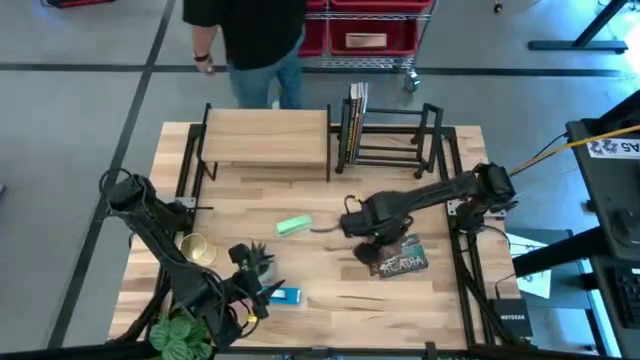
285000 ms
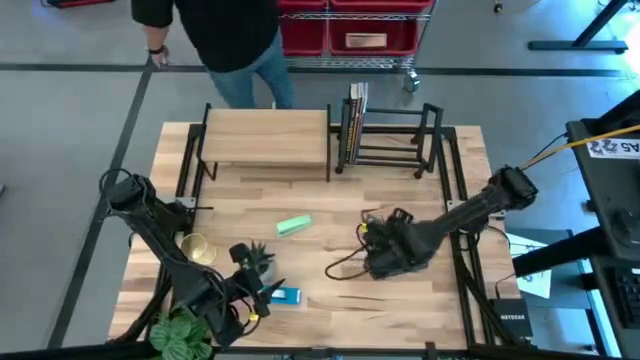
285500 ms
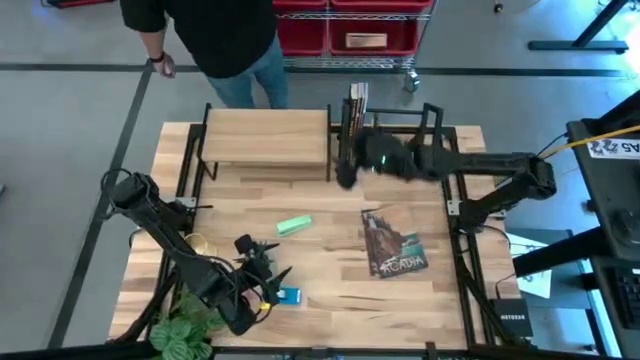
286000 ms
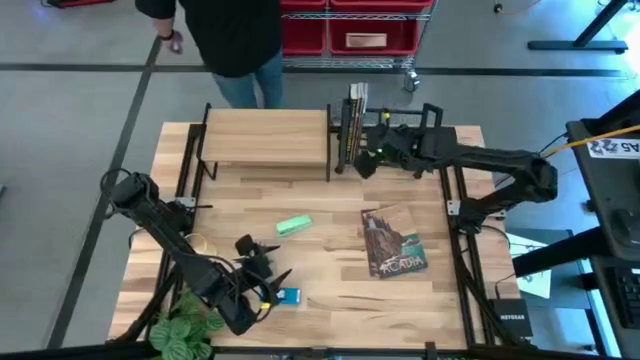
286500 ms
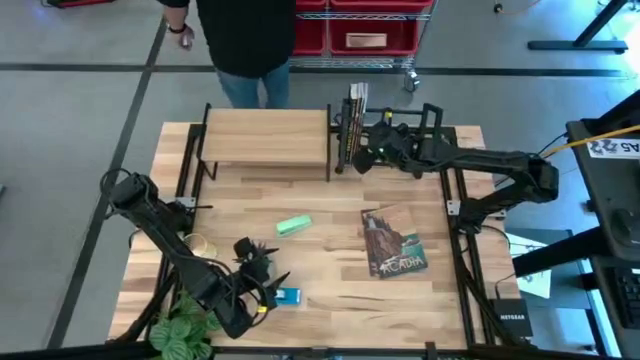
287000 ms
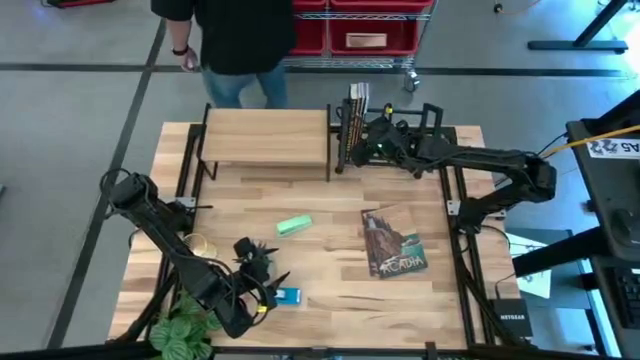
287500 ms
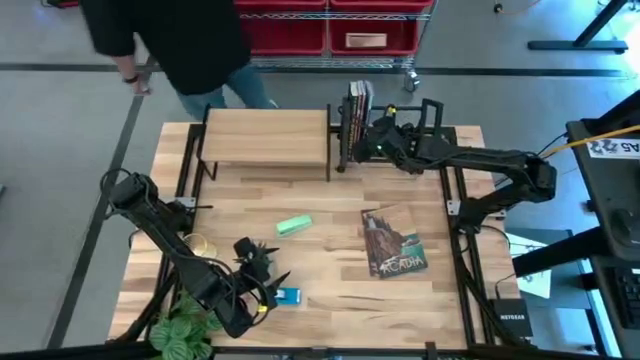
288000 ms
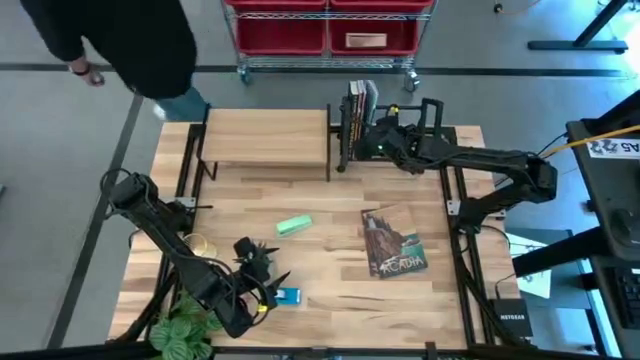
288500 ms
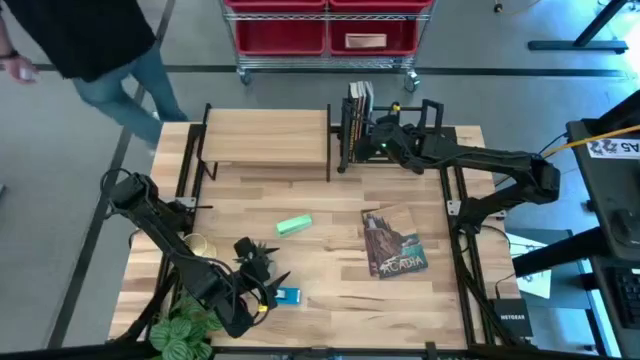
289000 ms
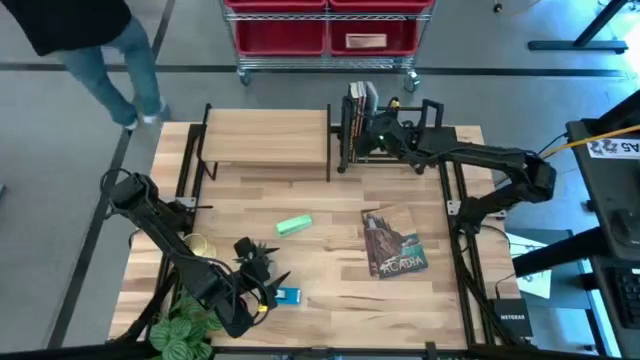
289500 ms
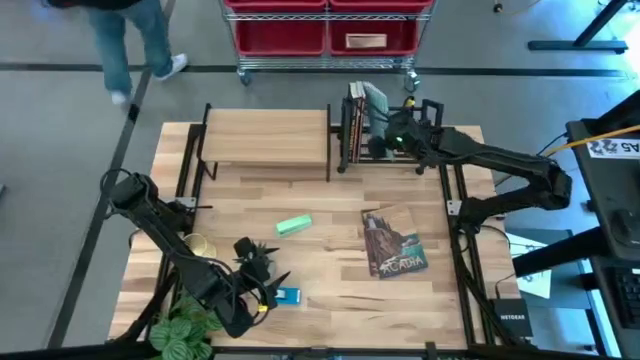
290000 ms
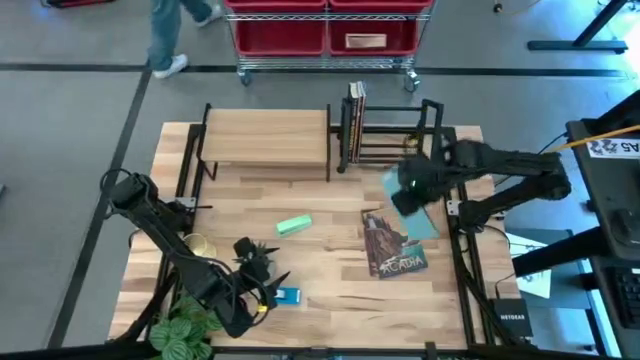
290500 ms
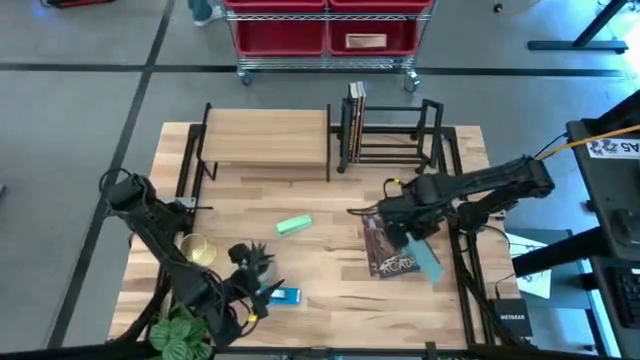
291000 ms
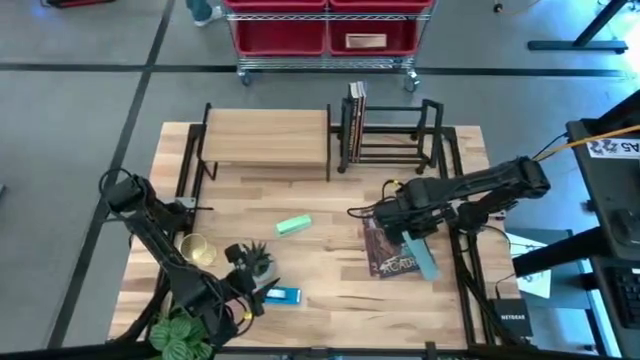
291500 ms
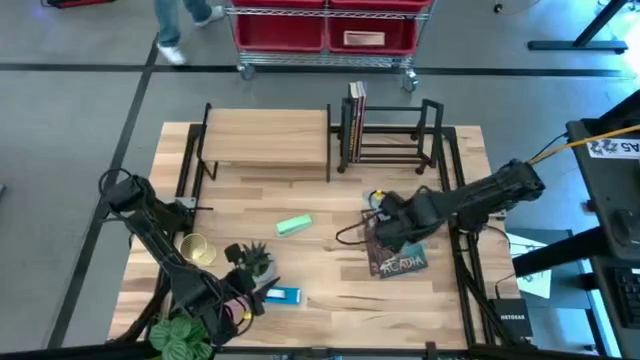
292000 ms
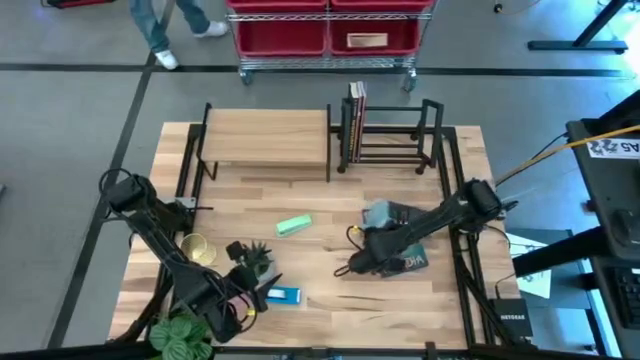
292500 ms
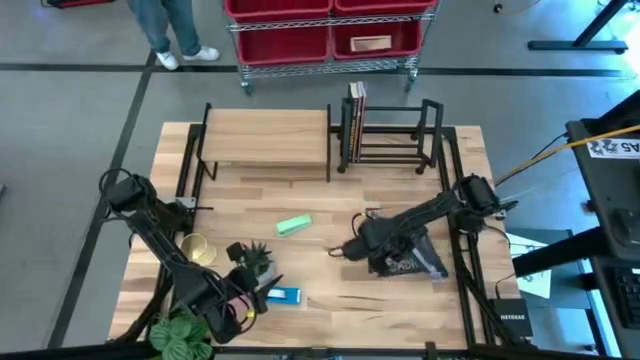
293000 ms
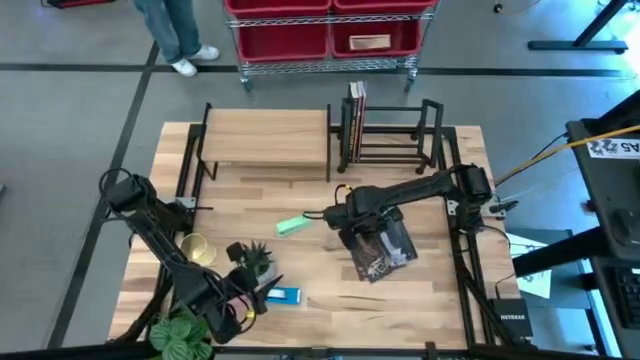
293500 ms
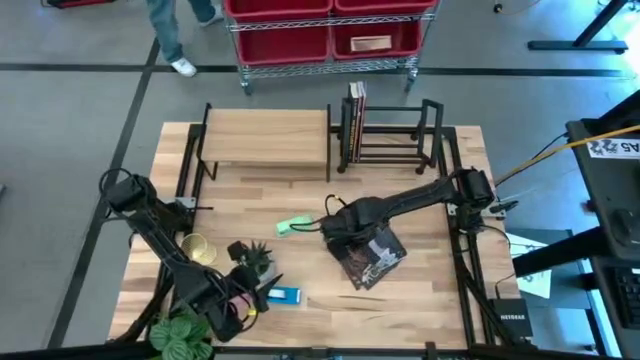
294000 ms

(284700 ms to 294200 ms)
Task: Stock shelves
Remove the blue book from the bookshelf

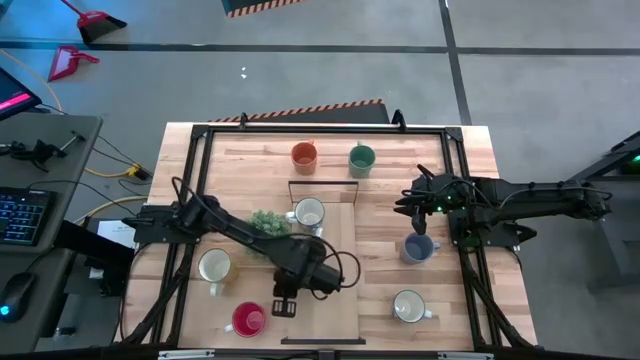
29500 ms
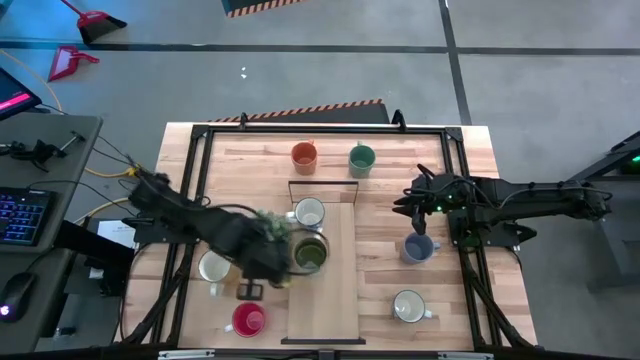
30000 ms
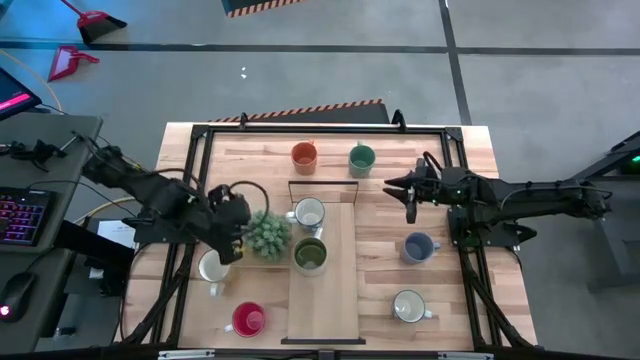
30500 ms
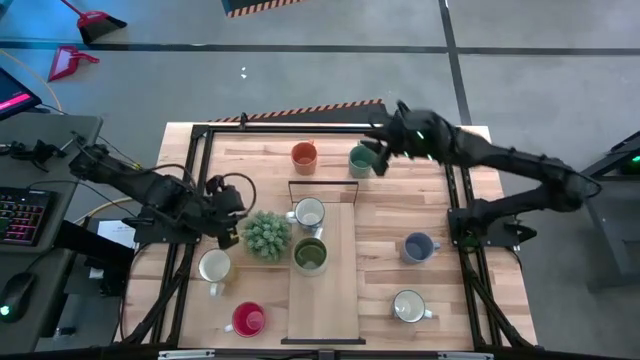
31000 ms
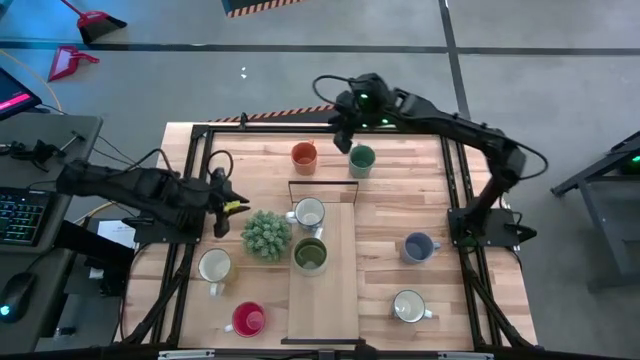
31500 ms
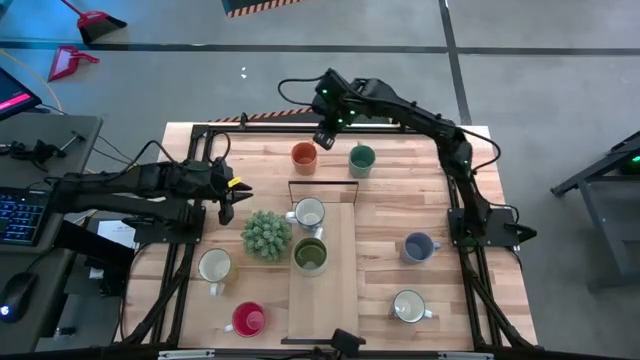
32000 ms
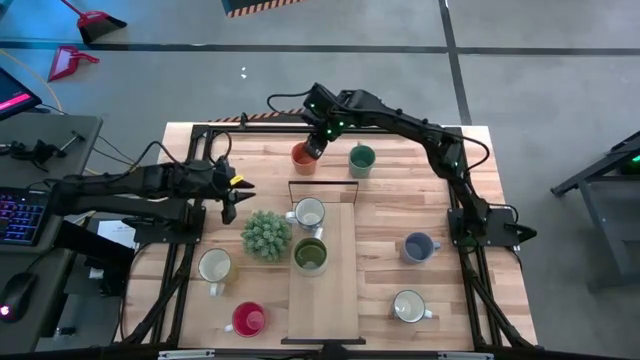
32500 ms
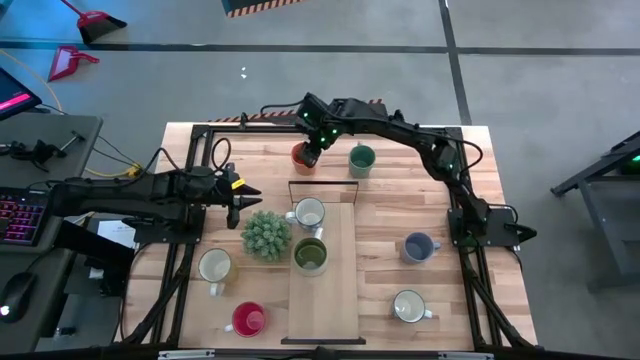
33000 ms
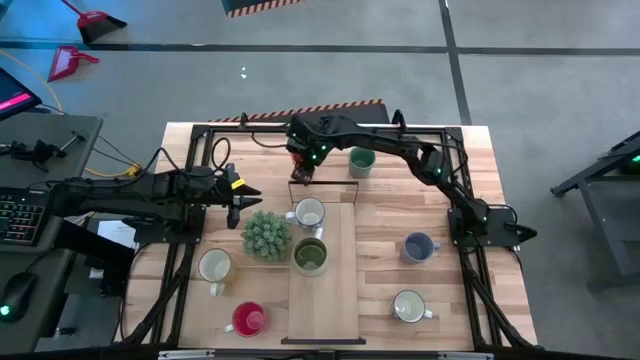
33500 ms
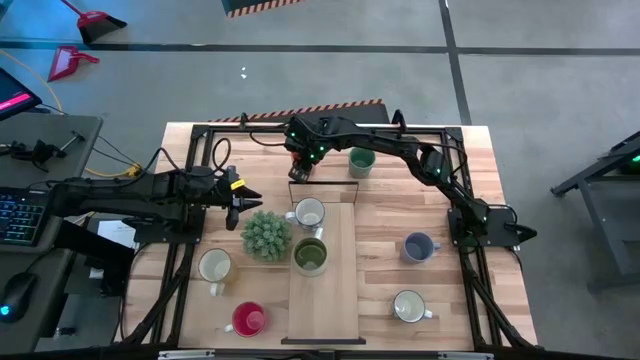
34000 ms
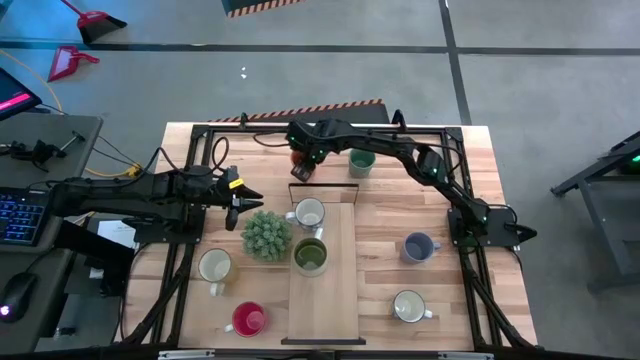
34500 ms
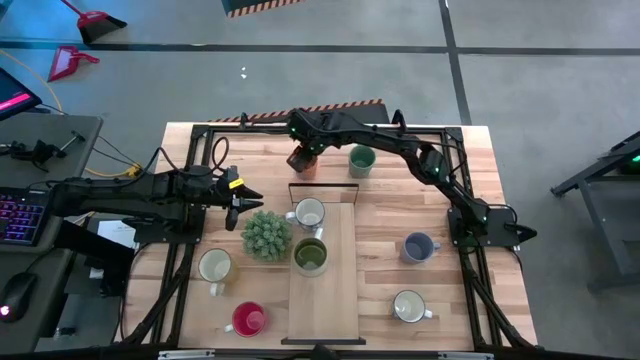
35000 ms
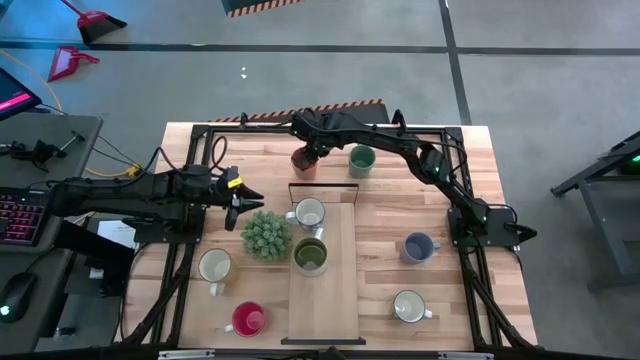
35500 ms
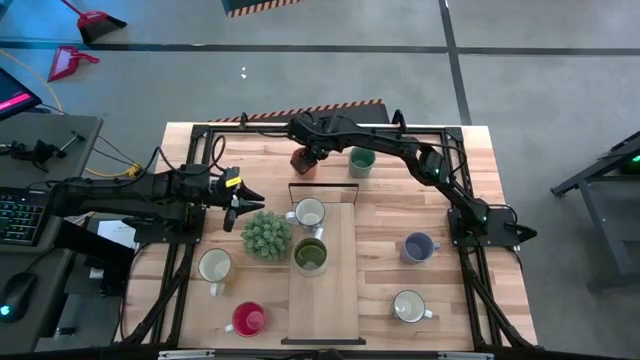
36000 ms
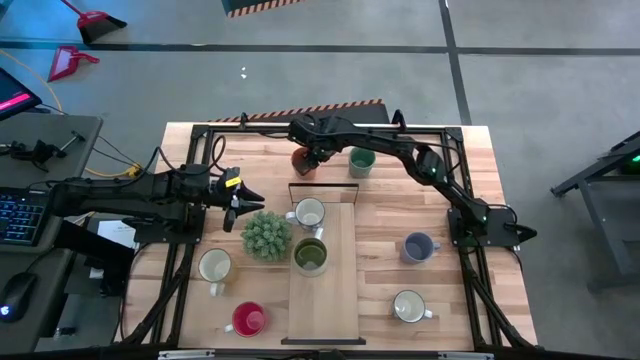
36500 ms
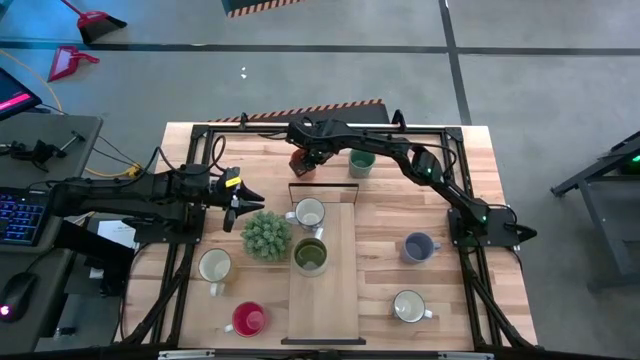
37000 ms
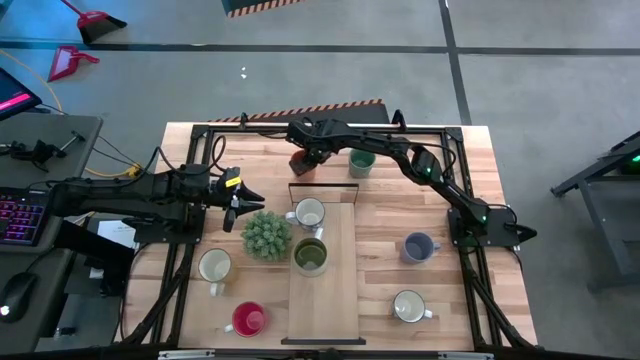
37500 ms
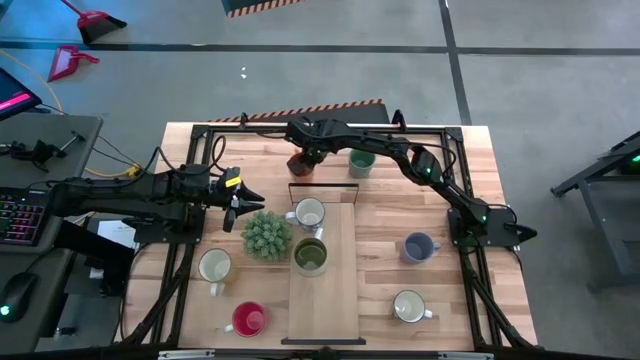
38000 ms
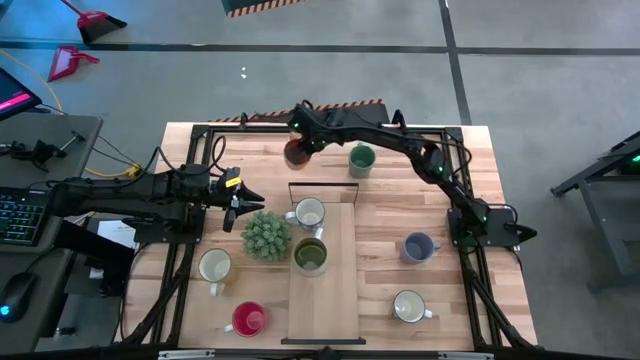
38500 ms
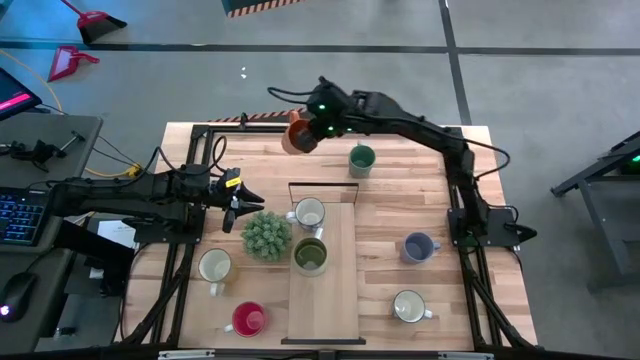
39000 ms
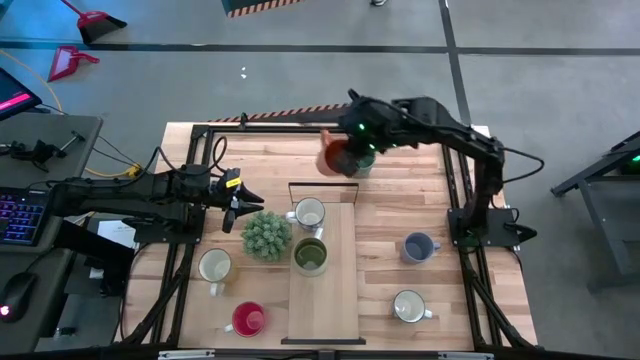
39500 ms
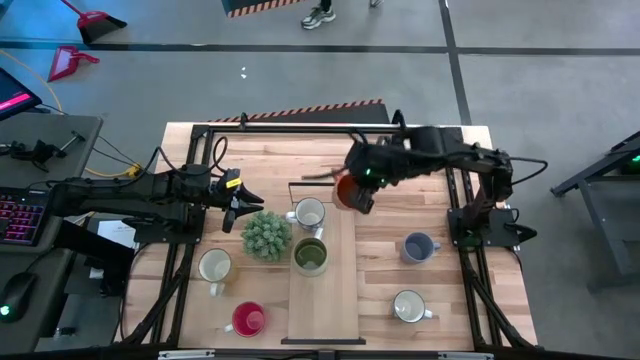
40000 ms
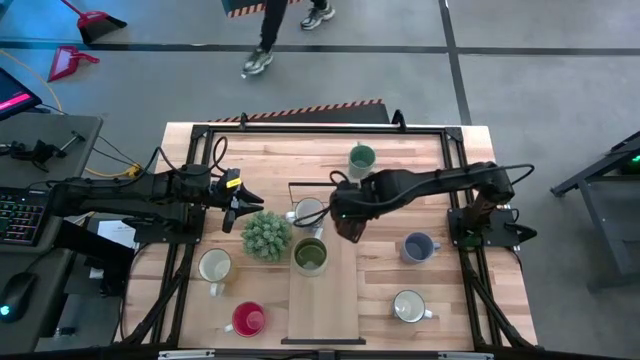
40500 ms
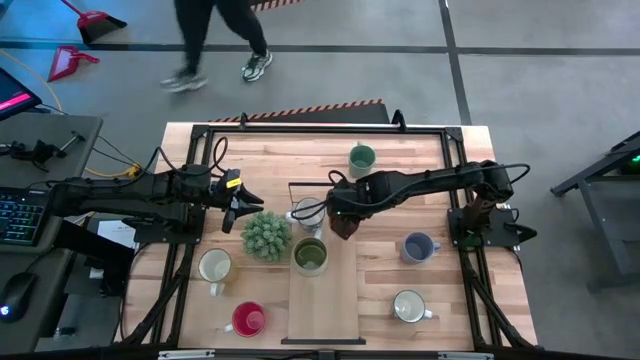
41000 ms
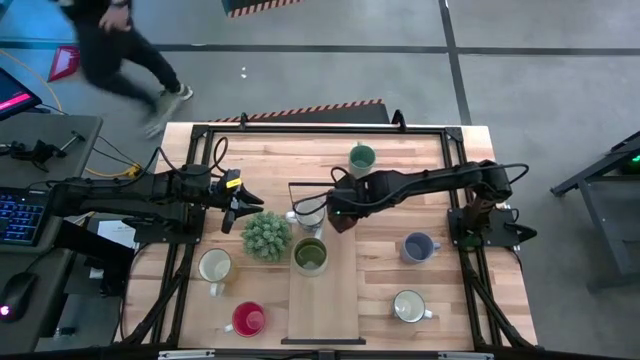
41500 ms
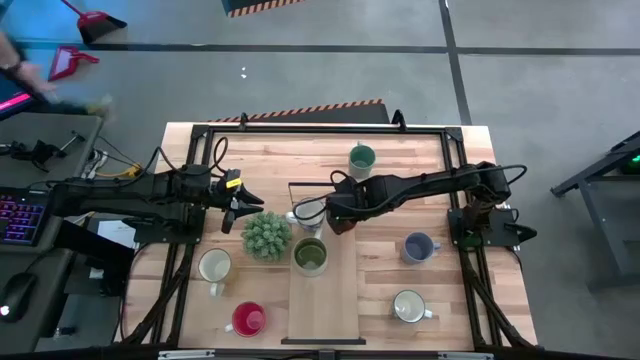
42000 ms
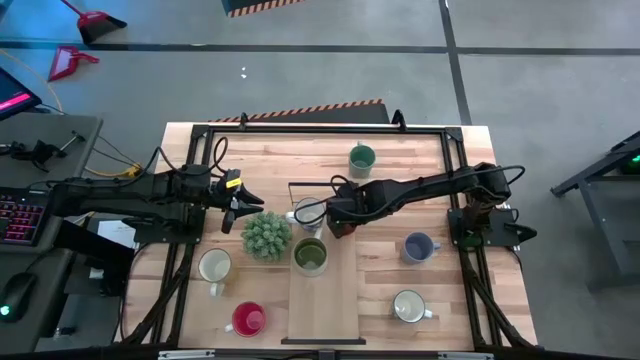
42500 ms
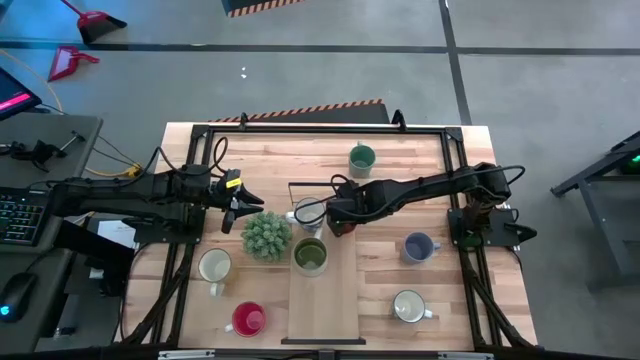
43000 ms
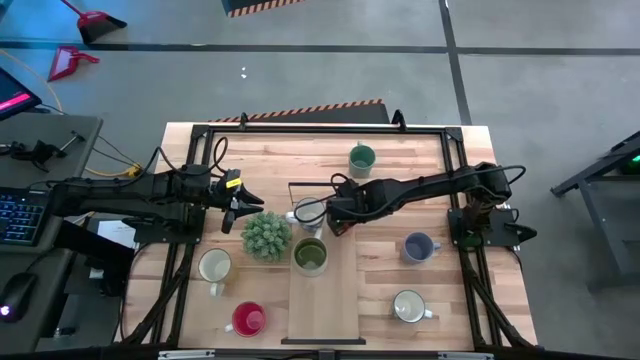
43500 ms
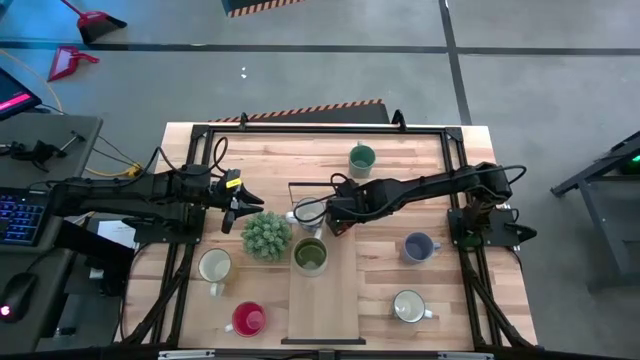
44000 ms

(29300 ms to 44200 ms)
Task: Place coffee mugs
Put the orange mug on the shelf
